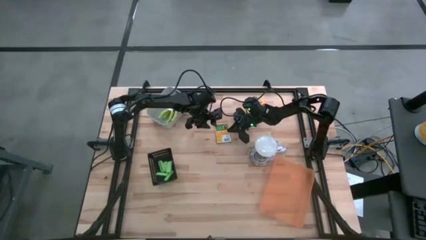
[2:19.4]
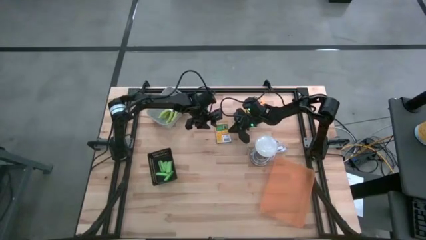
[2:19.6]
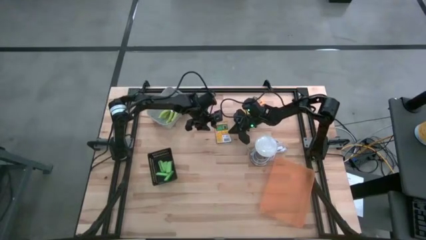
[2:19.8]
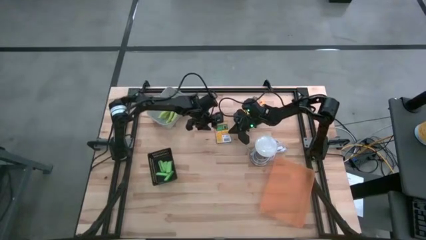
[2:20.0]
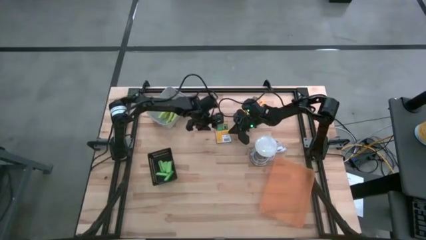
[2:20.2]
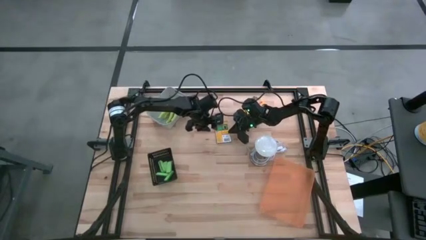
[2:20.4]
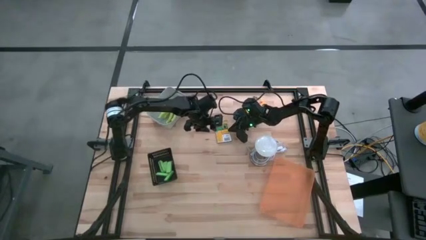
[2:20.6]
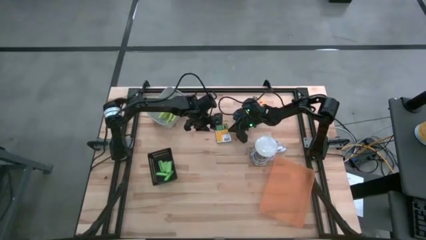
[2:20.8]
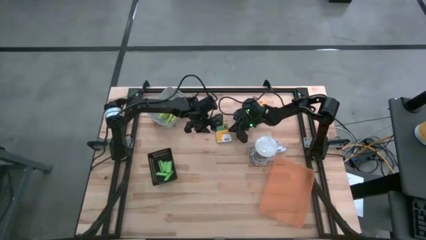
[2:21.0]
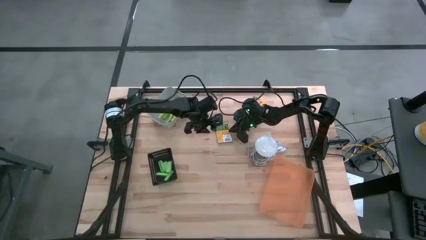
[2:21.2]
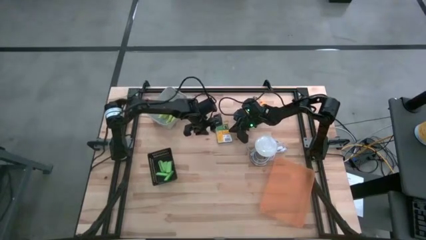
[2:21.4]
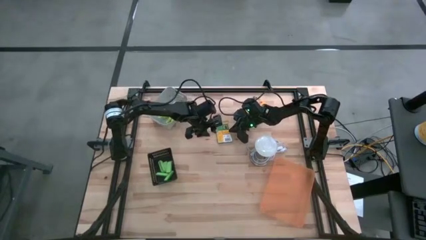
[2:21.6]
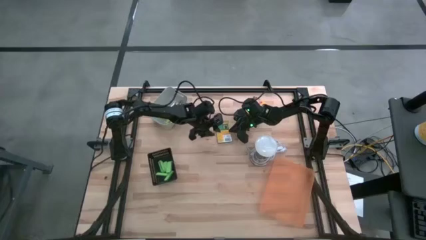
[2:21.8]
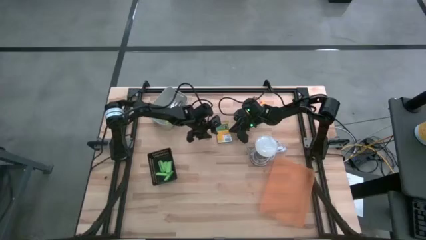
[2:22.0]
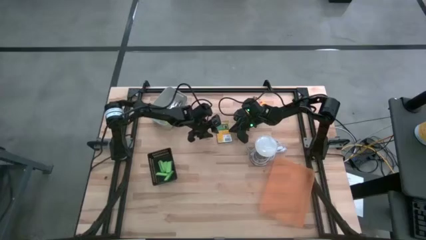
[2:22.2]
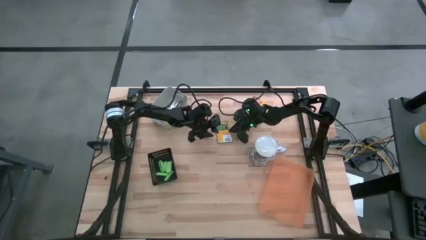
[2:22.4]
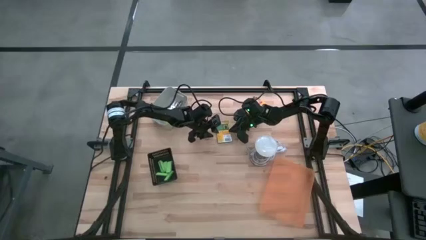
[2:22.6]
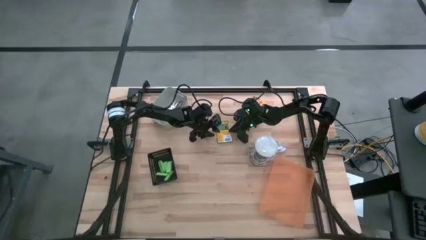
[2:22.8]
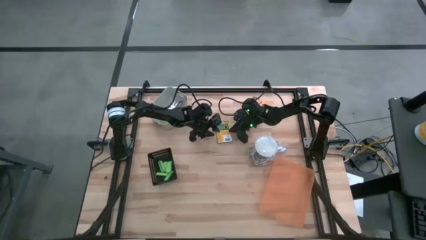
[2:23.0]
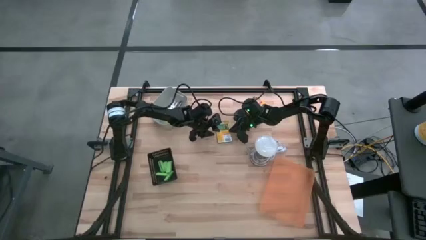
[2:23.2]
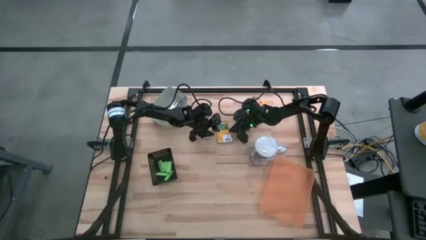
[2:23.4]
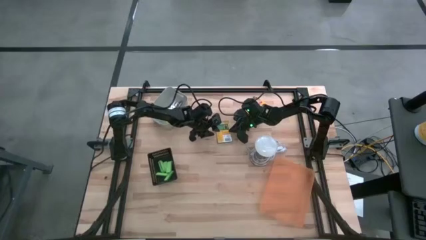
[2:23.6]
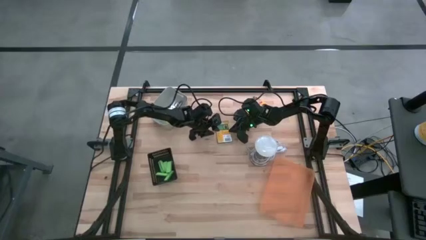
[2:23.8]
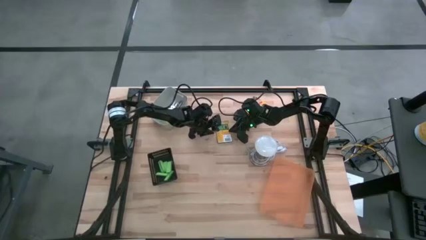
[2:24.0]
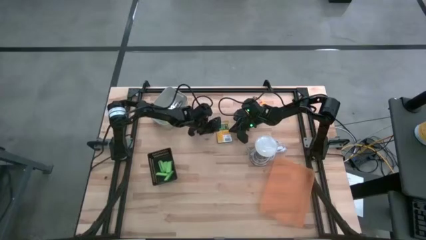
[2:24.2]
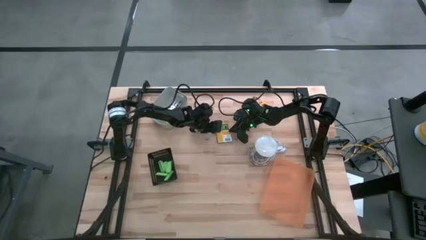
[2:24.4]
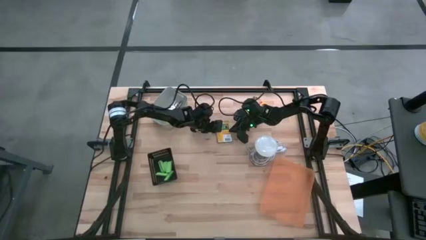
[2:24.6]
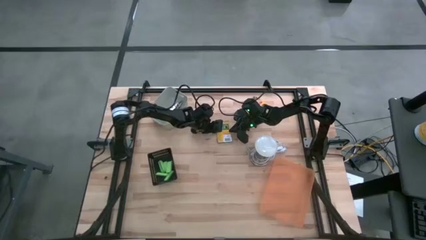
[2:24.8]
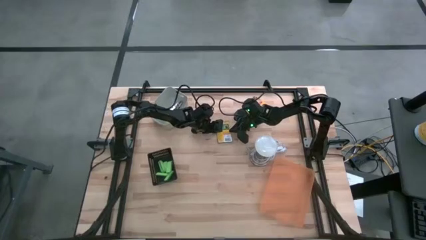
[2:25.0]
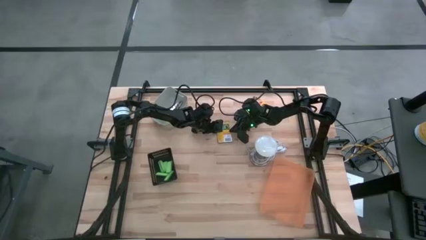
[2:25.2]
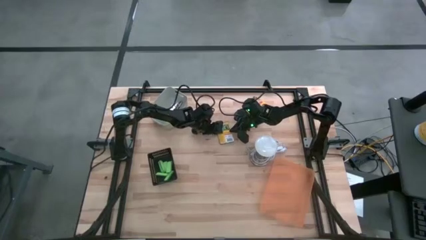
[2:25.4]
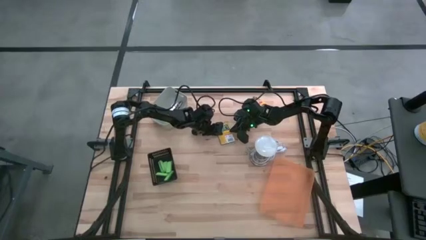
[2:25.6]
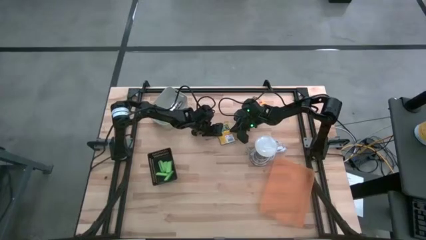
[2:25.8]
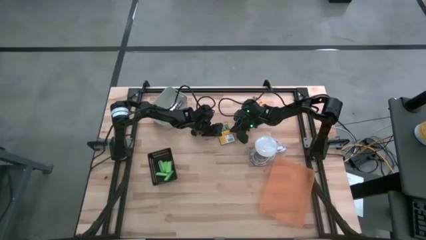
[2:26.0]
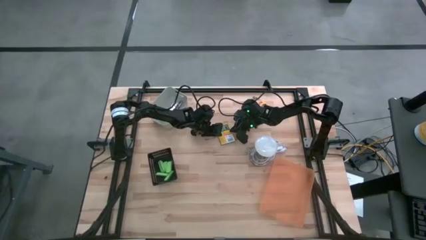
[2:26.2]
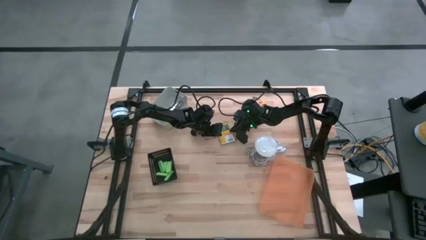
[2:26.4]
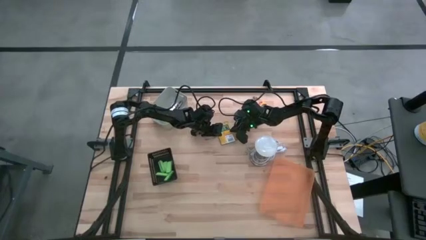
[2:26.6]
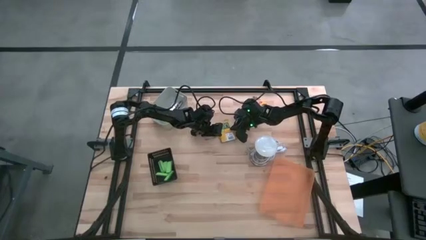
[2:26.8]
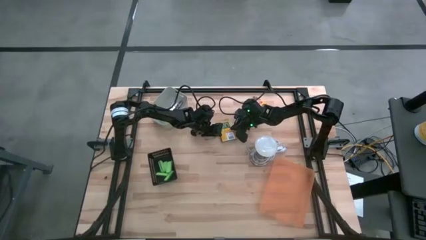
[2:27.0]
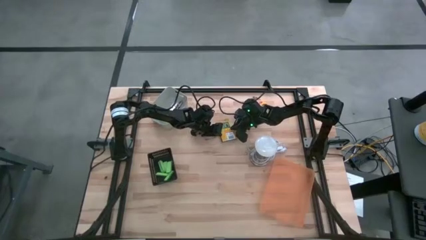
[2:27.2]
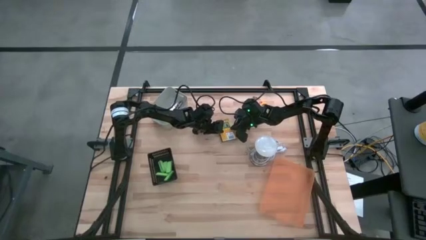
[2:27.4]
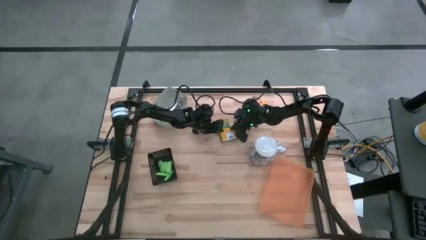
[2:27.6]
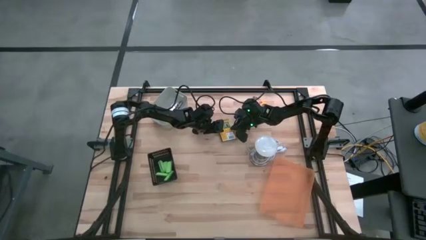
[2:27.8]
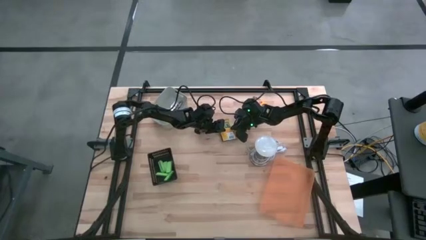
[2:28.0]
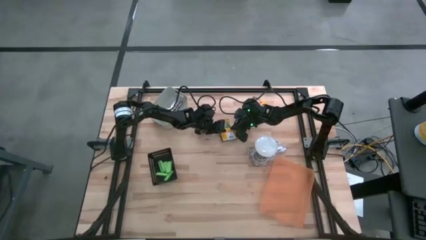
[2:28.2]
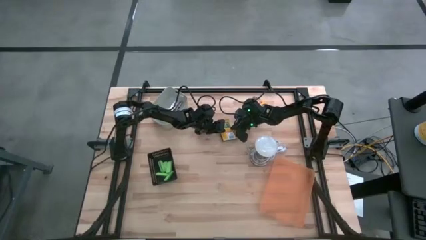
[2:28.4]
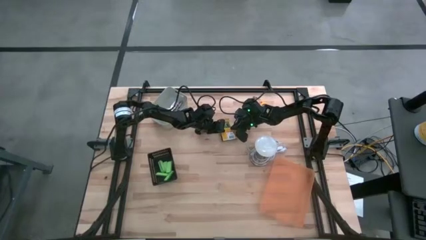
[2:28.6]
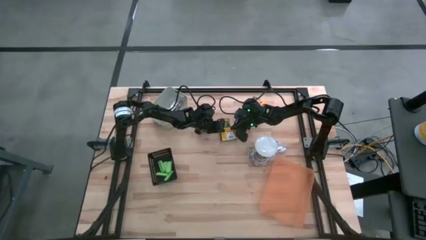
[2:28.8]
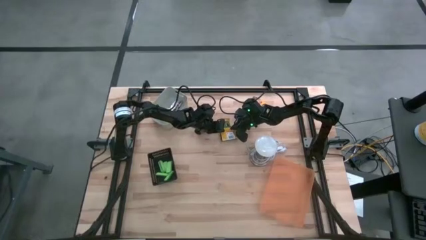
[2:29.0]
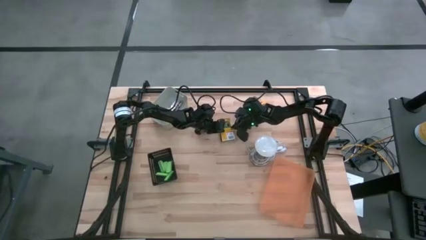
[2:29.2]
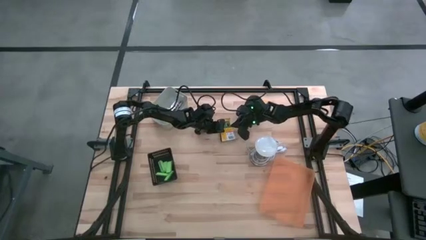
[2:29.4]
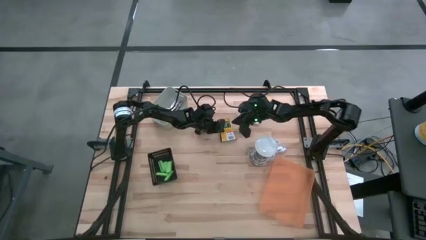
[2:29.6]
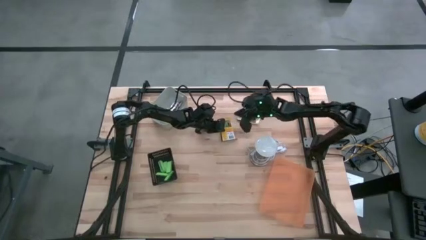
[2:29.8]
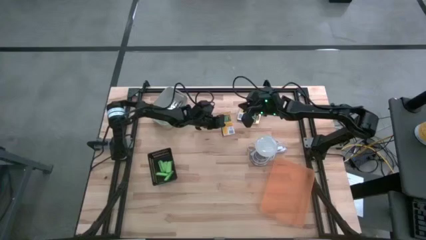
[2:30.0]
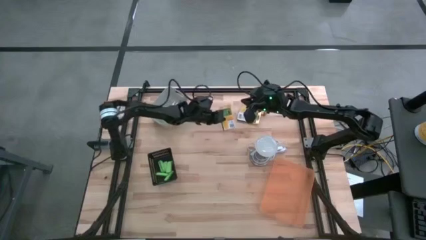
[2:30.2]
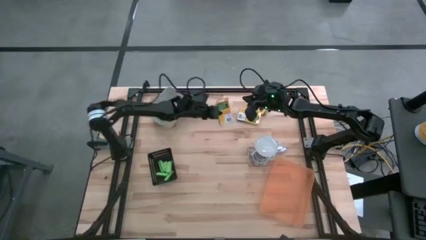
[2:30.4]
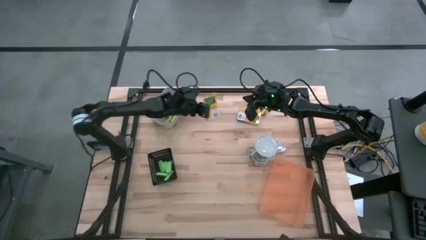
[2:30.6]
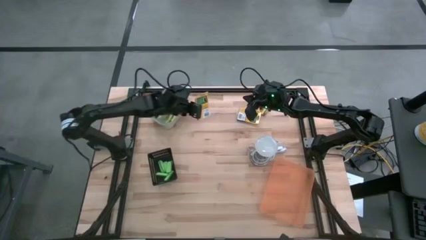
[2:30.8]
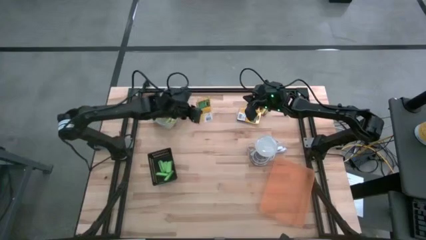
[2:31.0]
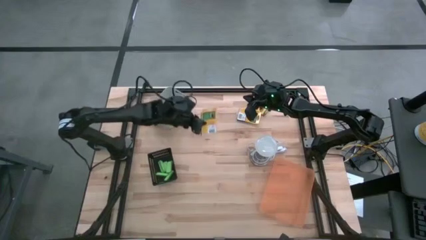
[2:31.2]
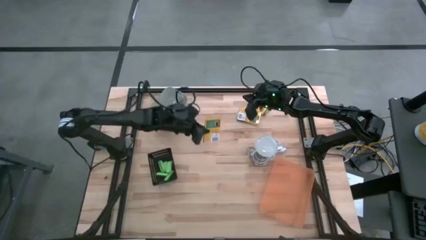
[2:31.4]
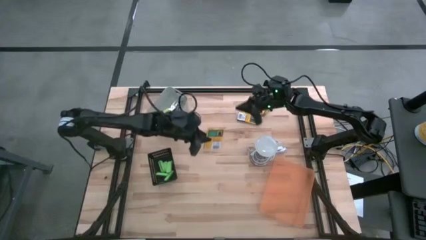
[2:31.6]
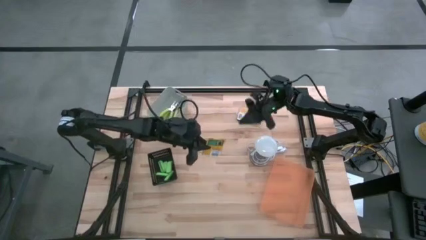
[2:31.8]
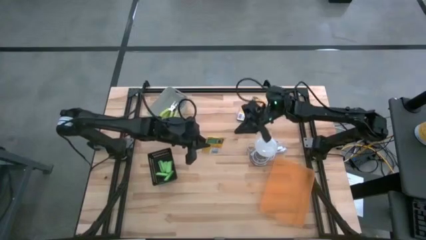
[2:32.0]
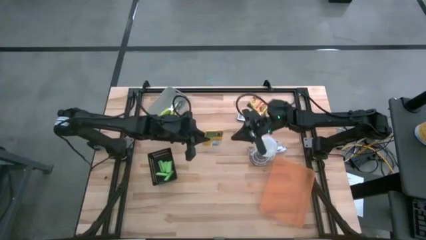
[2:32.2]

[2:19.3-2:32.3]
Task: Pick & Place School Supplies
Put the yellow yellow crayon box into the orange bin

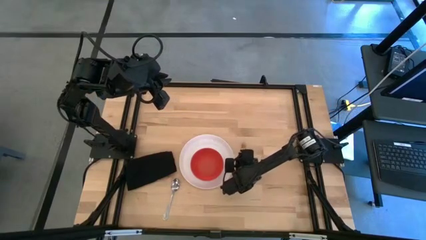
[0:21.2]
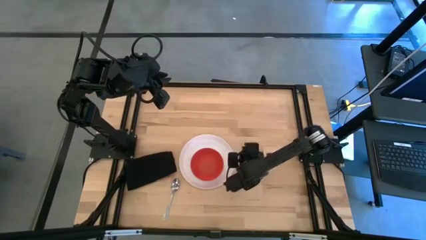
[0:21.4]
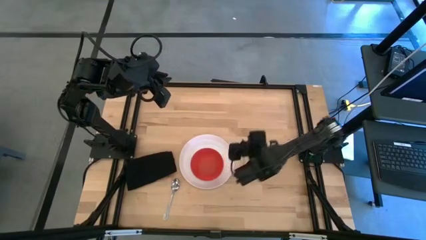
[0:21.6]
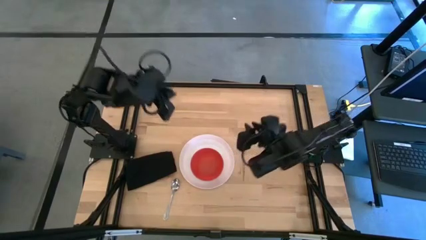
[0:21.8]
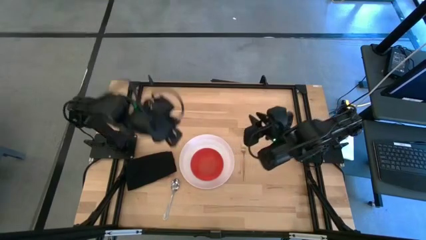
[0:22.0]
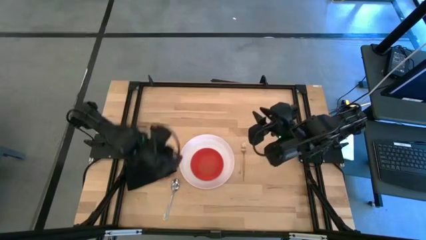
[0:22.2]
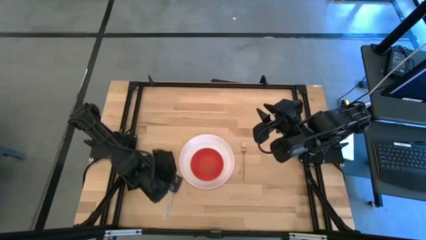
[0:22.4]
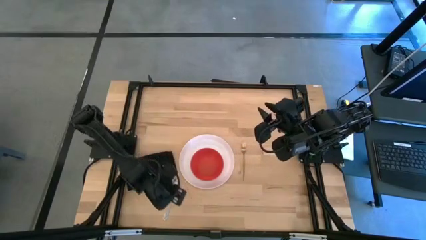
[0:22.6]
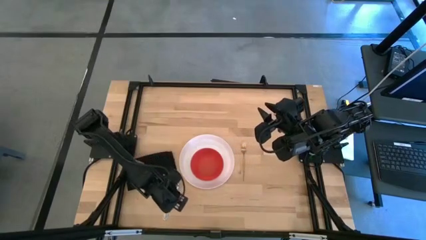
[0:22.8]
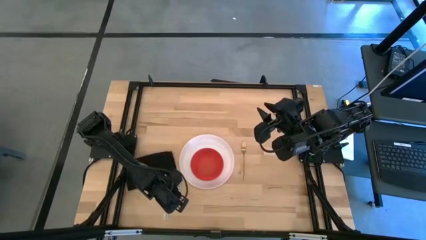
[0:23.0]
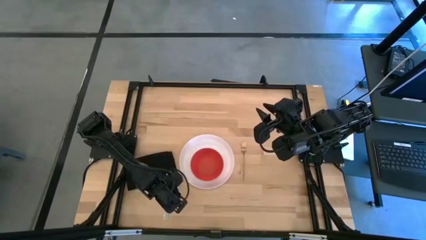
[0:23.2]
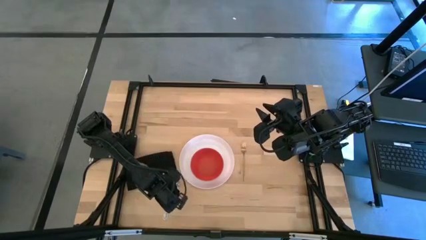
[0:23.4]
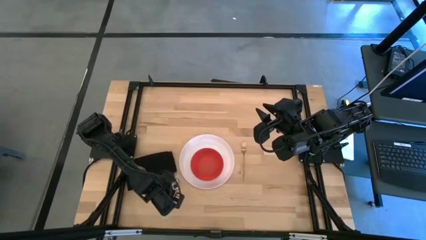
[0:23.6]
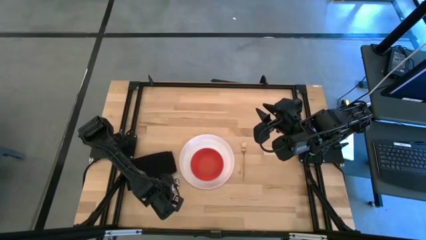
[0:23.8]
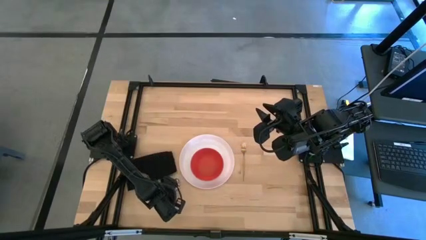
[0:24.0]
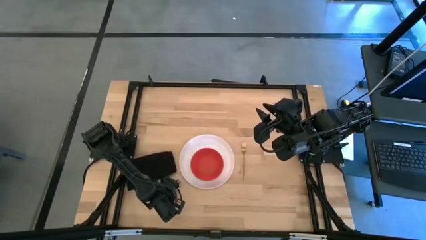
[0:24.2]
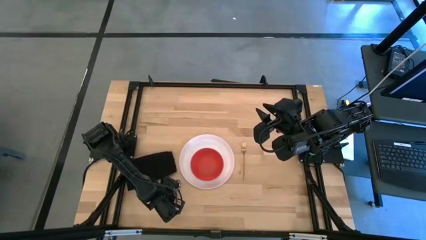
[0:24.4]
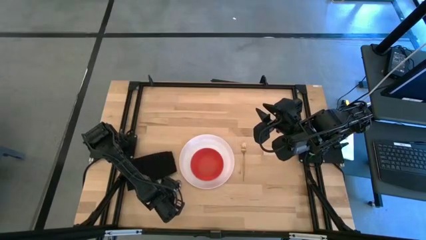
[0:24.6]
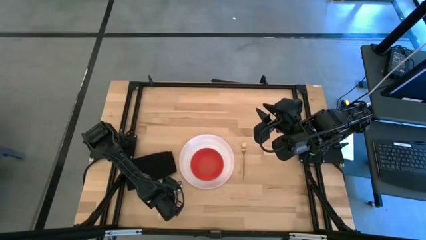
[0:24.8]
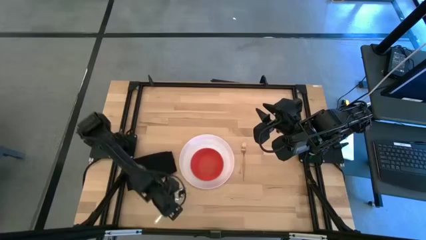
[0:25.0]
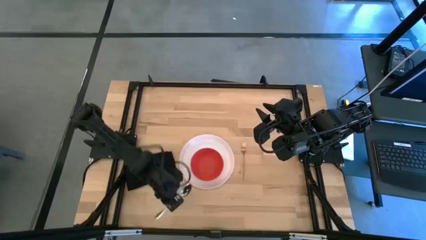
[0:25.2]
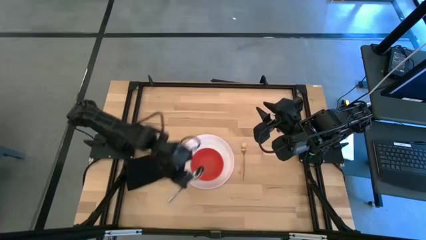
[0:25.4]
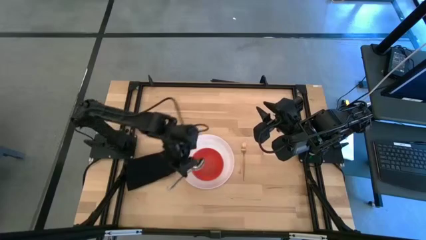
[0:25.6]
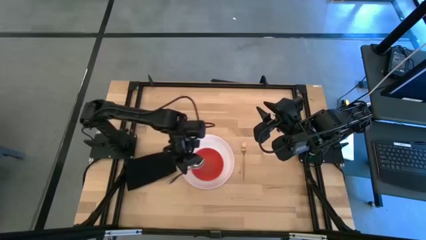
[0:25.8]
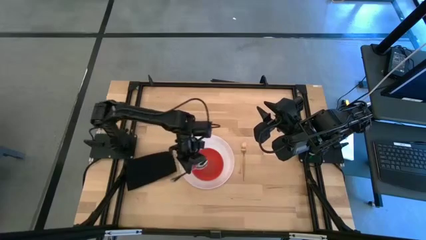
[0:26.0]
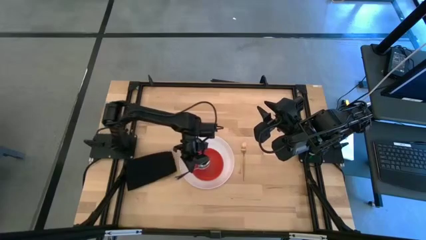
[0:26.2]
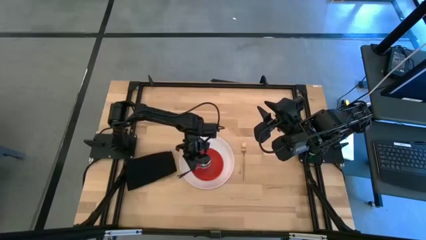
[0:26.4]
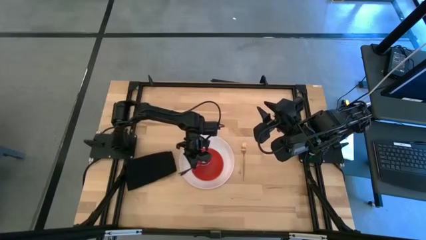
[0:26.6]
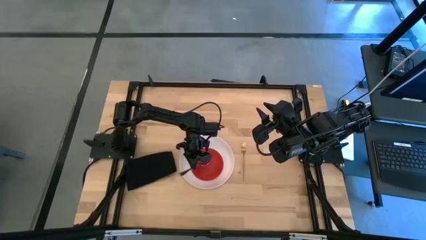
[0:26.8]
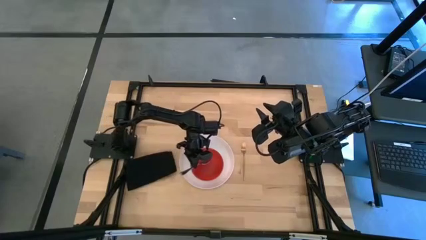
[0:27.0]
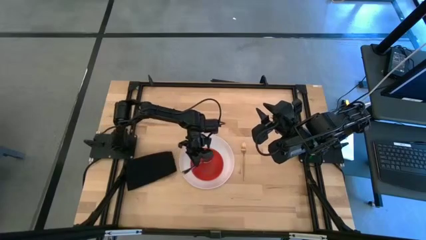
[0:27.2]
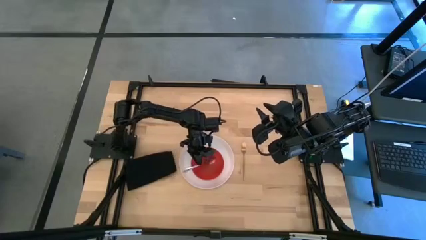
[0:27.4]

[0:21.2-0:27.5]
Task: Set table place
Put the silver spoon into the orange bowl
